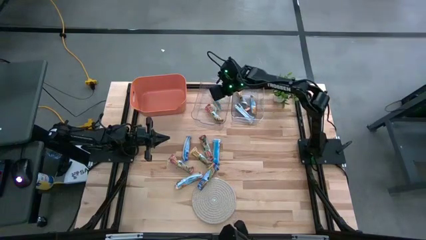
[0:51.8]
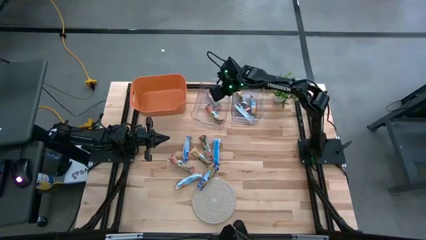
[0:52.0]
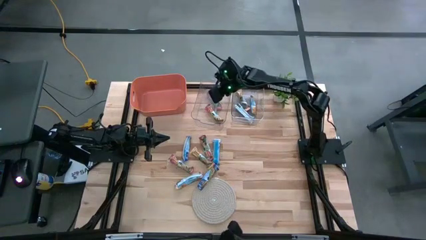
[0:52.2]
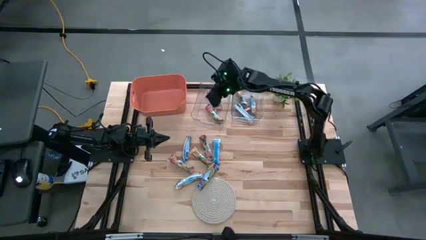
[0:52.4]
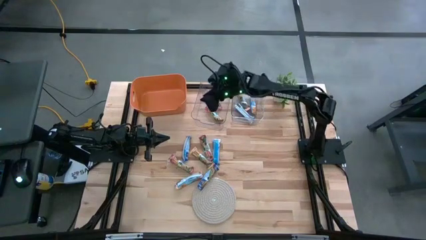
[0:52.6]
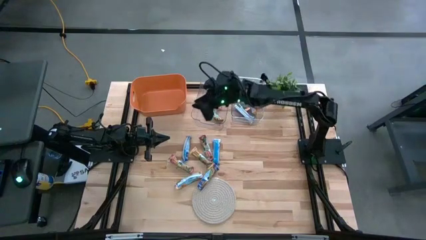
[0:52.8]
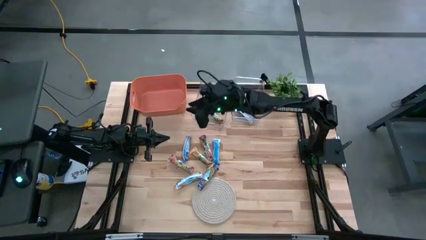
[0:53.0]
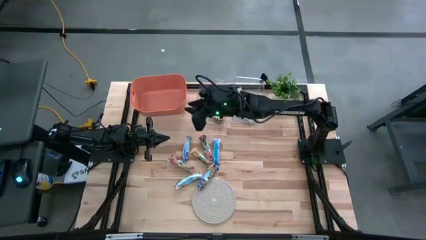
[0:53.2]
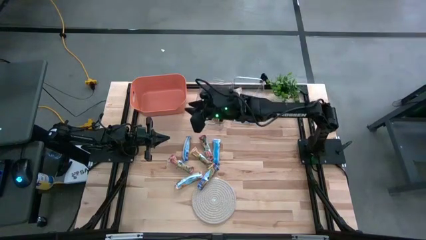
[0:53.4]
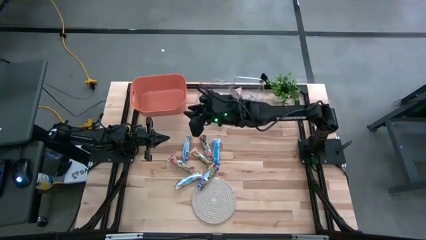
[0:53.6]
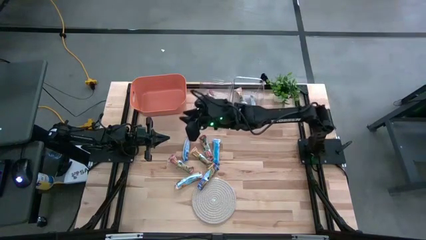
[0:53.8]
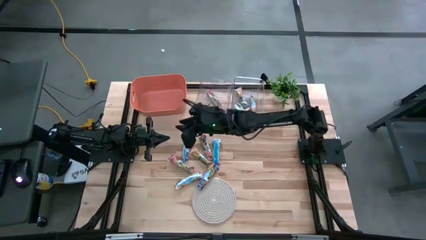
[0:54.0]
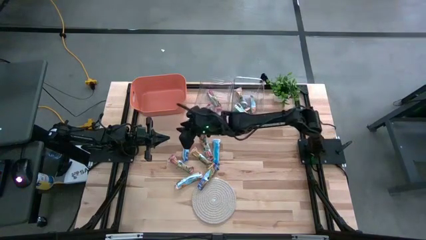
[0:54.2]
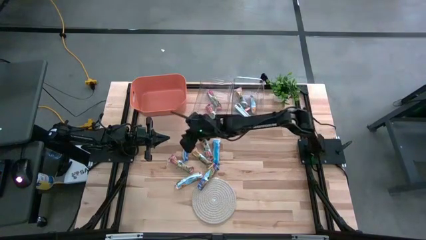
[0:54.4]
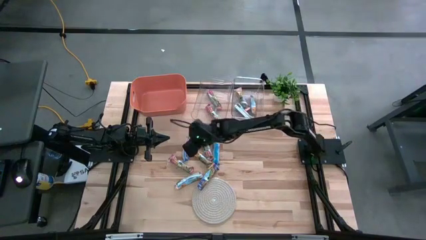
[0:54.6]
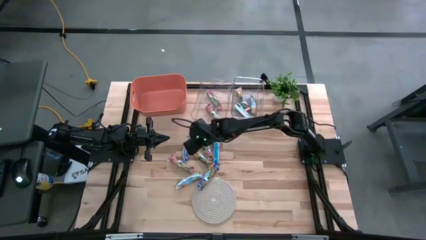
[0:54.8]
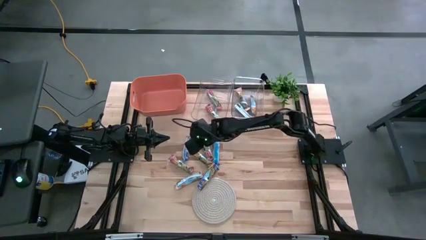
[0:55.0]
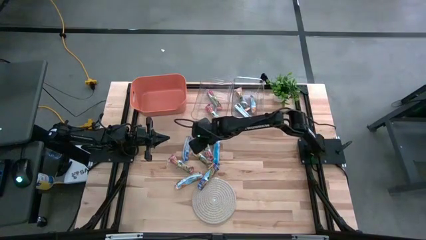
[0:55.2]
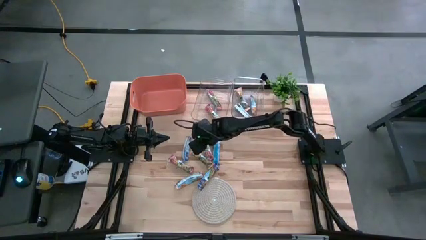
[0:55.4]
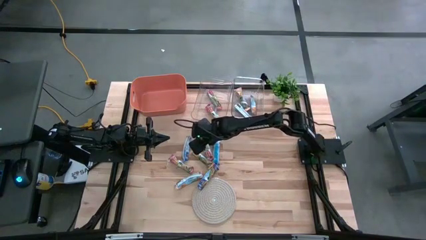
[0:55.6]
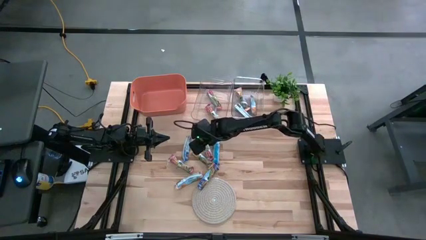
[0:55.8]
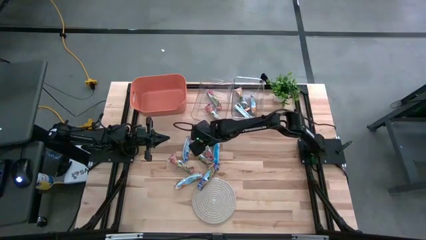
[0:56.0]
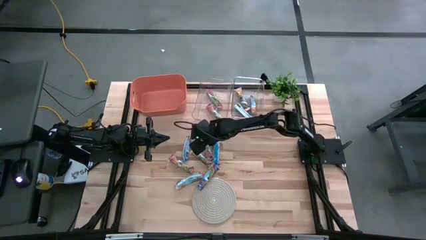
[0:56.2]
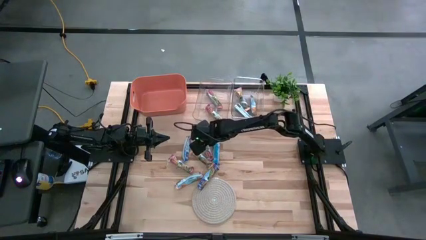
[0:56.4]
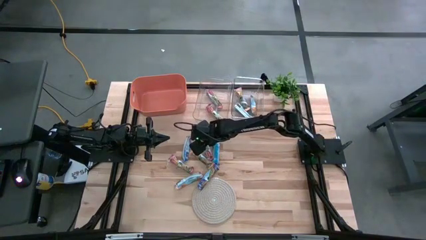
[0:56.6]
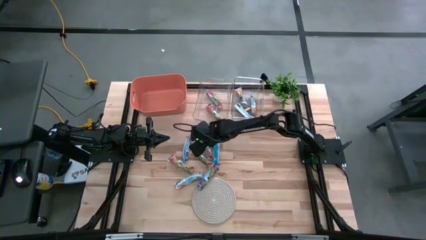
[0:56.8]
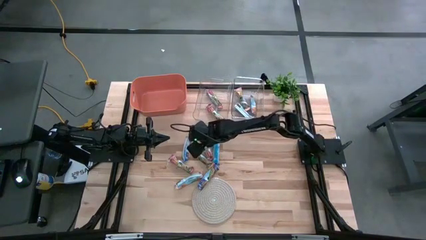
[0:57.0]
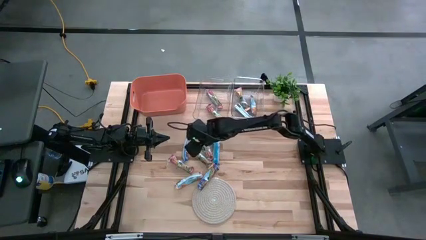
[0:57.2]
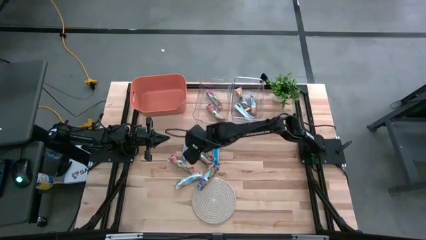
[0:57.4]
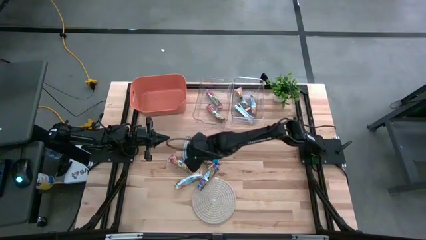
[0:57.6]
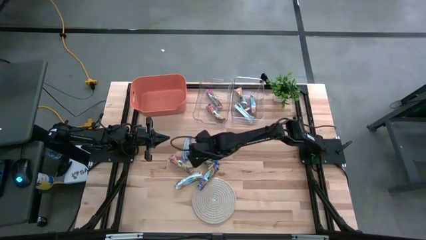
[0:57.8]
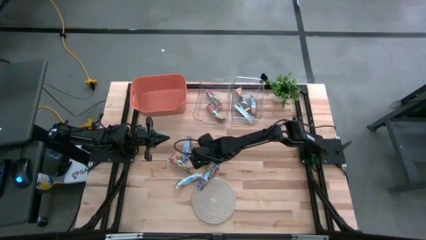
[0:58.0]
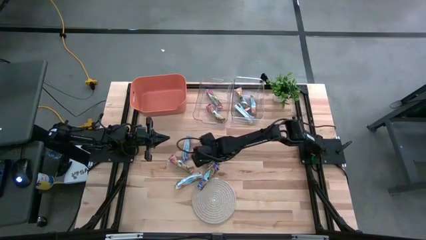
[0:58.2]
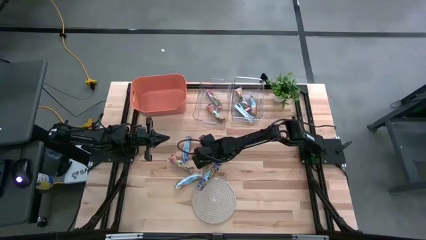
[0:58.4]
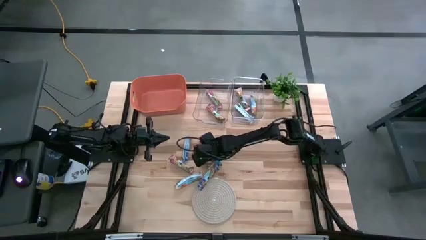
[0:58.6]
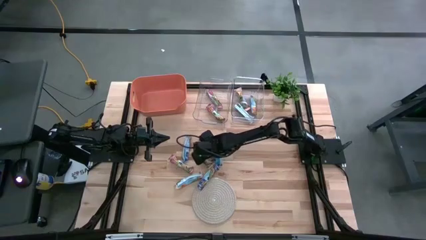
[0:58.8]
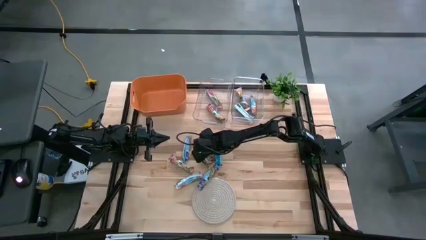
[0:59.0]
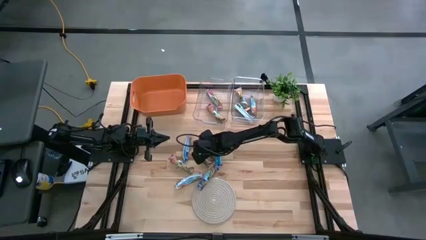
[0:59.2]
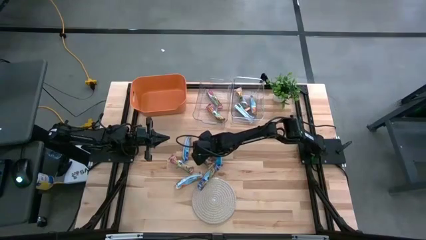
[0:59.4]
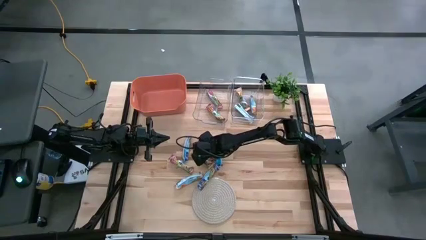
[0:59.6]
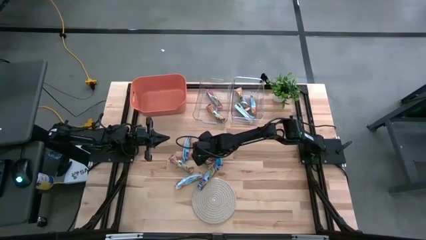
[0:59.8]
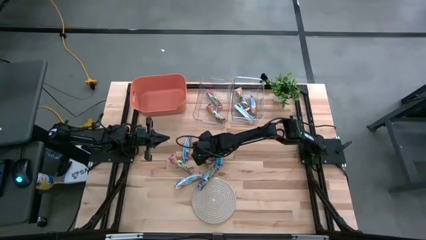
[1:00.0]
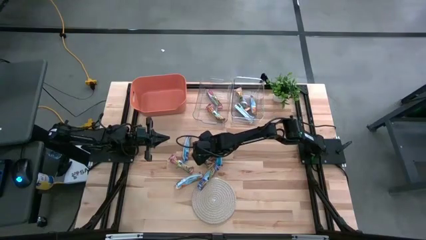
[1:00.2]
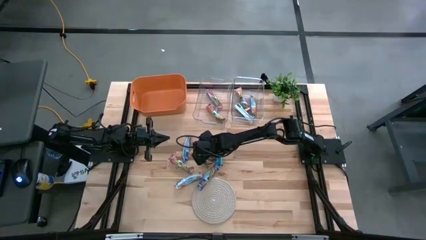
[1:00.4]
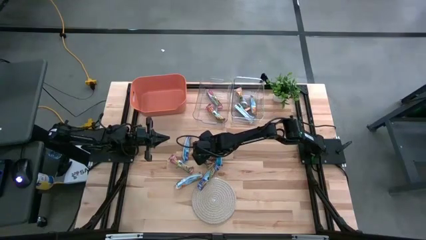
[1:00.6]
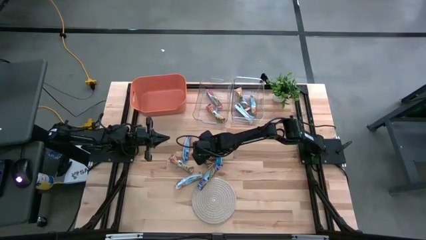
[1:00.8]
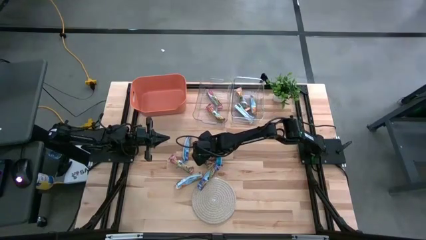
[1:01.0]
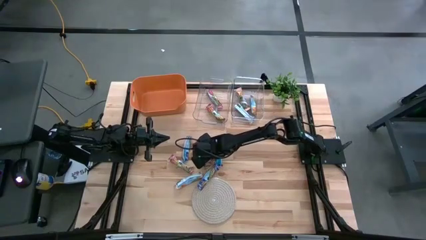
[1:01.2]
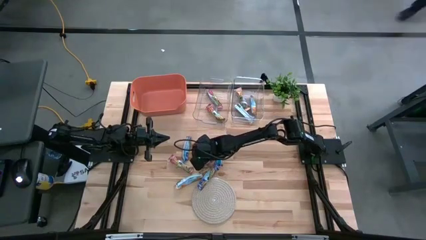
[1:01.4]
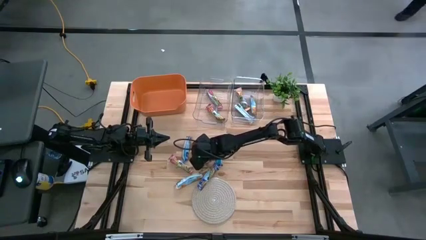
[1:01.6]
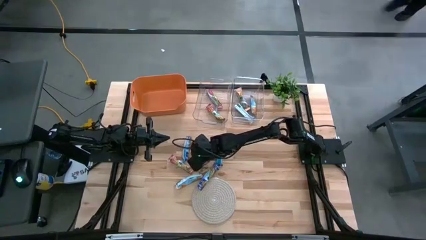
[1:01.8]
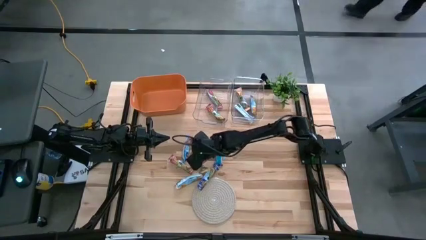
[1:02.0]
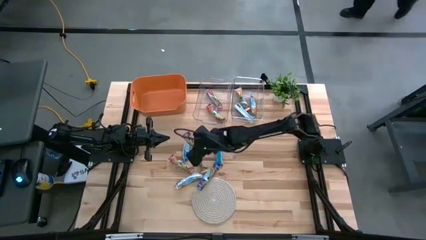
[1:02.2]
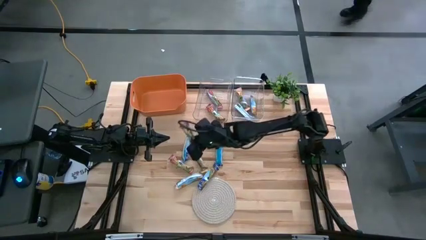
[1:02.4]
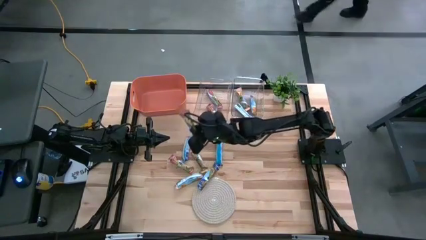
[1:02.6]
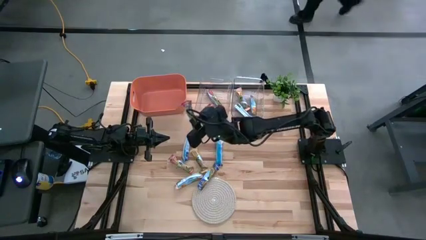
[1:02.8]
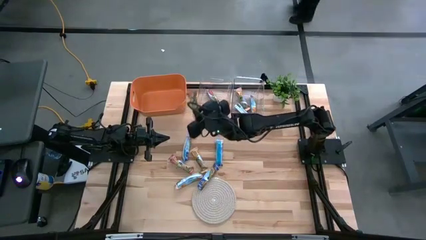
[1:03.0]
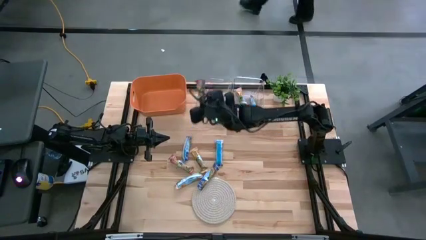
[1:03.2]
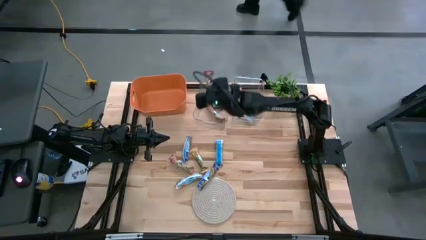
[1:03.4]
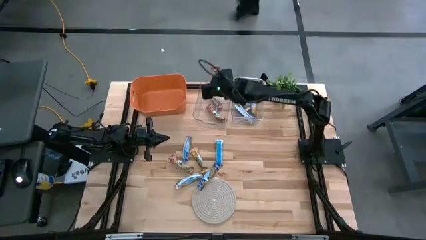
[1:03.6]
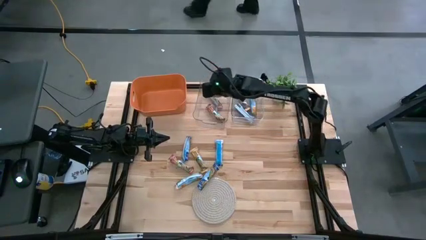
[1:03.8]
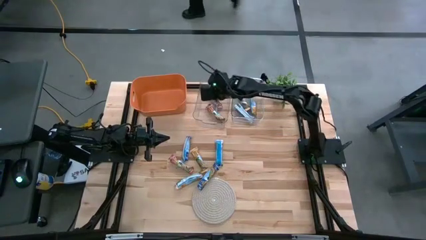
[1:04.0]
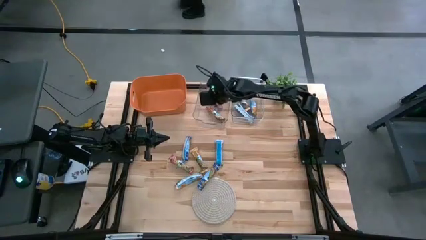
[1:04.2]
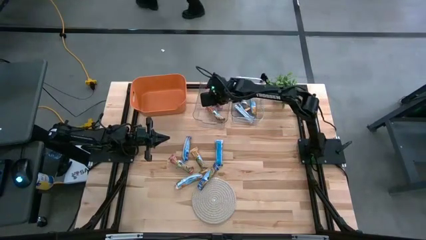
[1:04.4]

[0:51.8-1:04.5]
Task: Pick and place Granola Bars by type
Put the red granola bar into the left transparent bin
